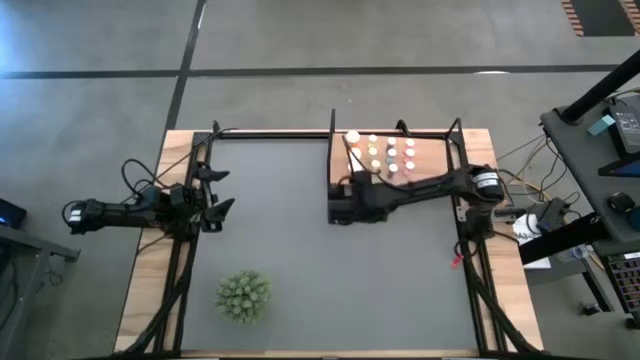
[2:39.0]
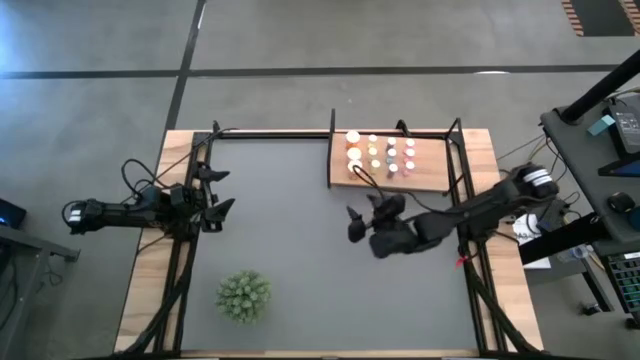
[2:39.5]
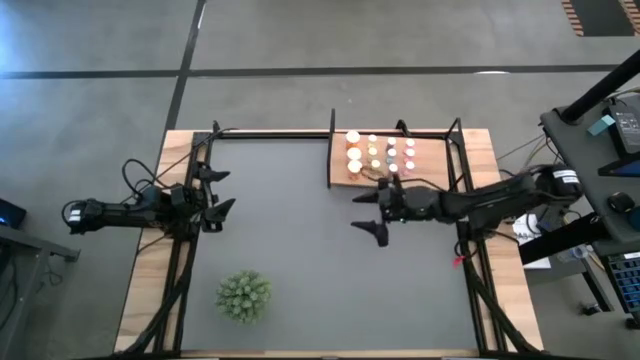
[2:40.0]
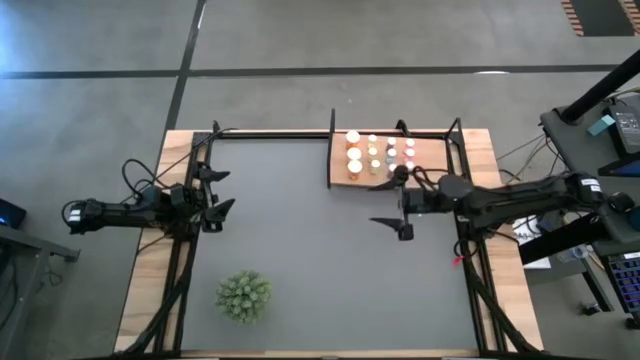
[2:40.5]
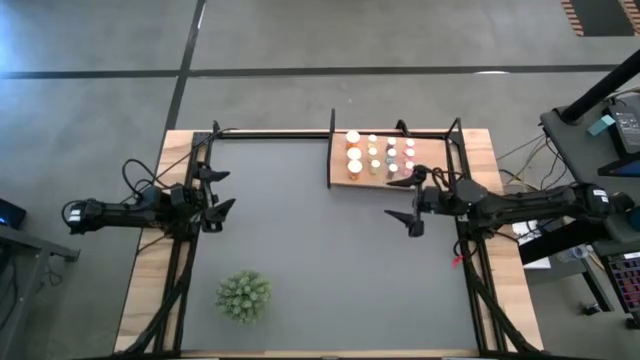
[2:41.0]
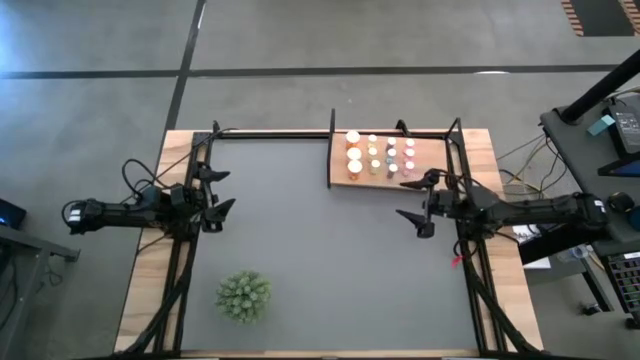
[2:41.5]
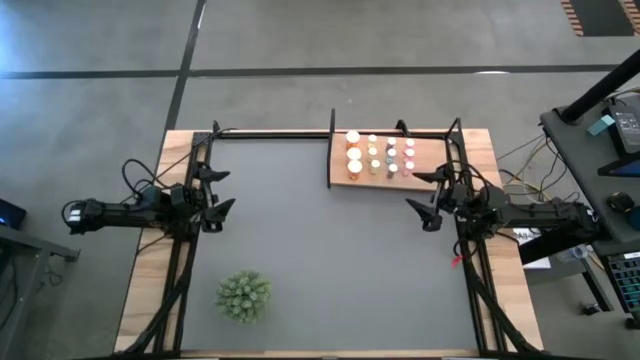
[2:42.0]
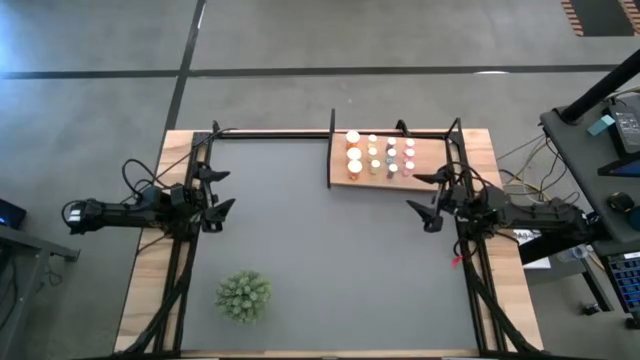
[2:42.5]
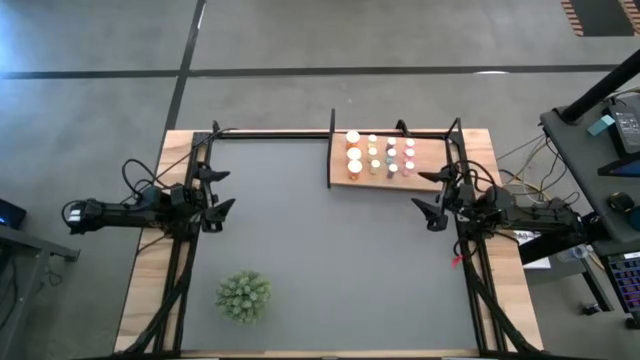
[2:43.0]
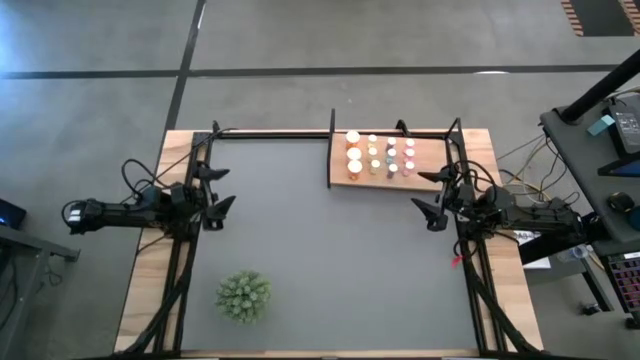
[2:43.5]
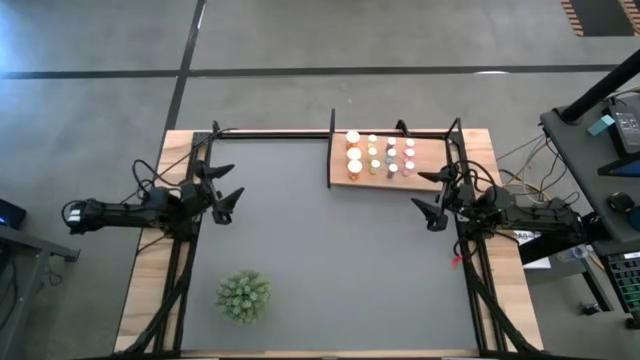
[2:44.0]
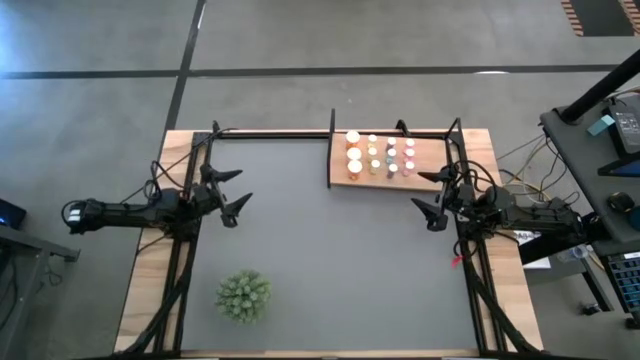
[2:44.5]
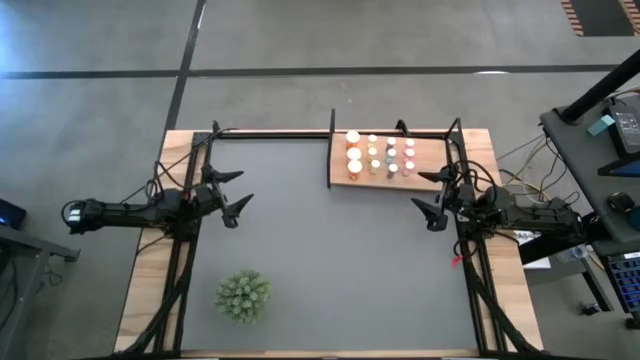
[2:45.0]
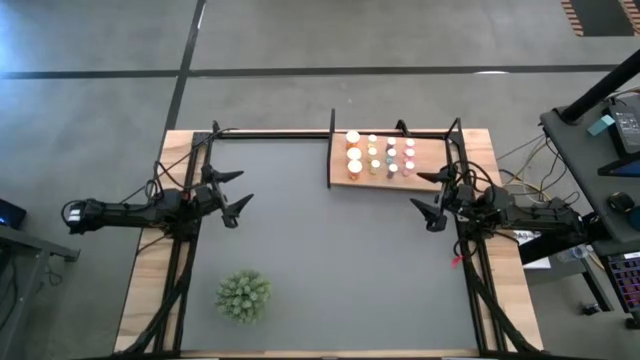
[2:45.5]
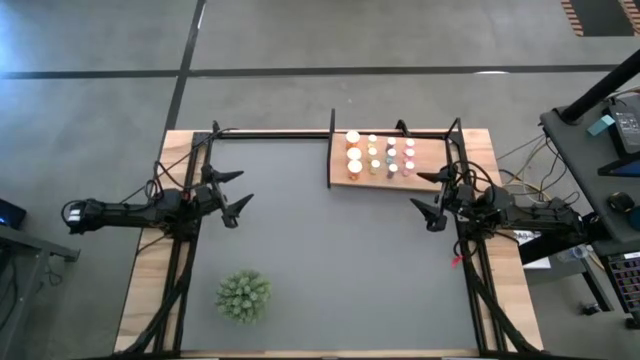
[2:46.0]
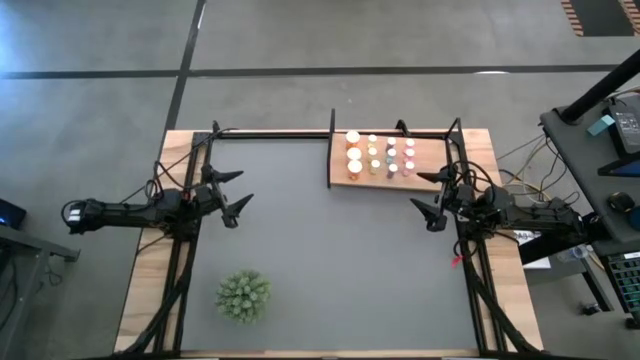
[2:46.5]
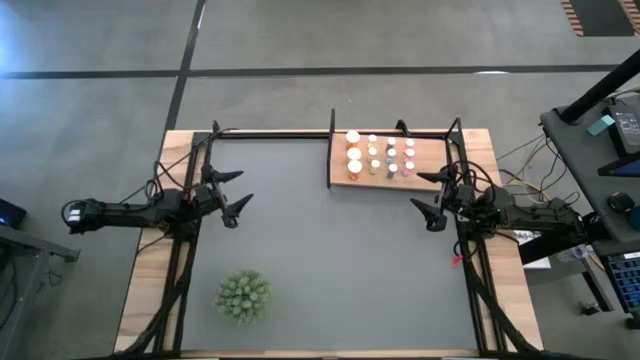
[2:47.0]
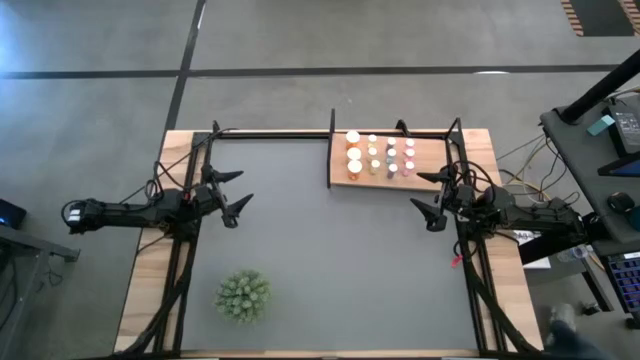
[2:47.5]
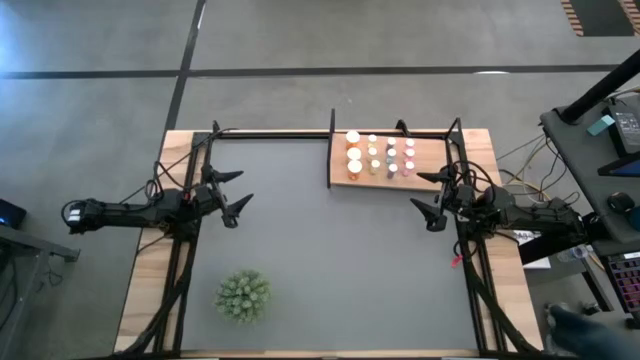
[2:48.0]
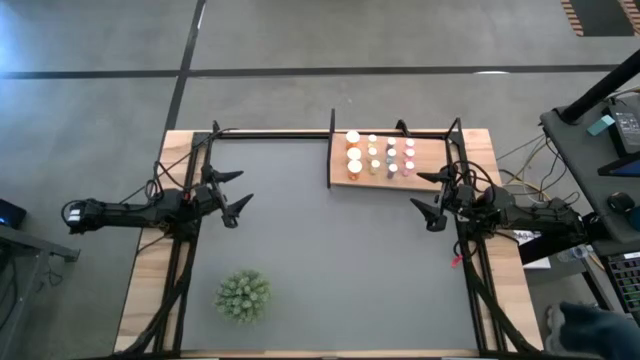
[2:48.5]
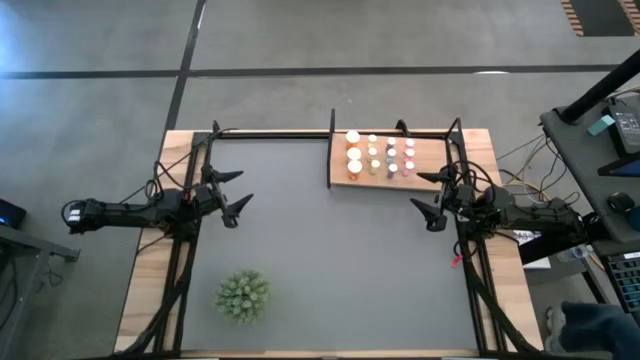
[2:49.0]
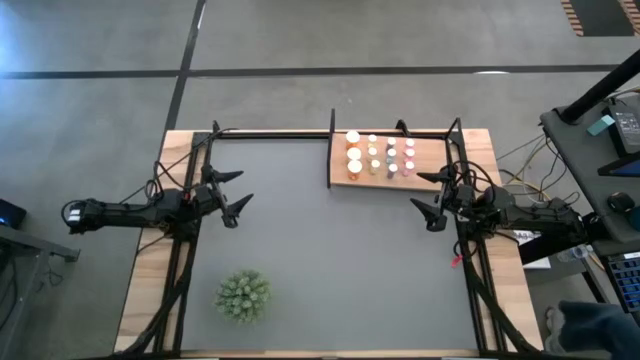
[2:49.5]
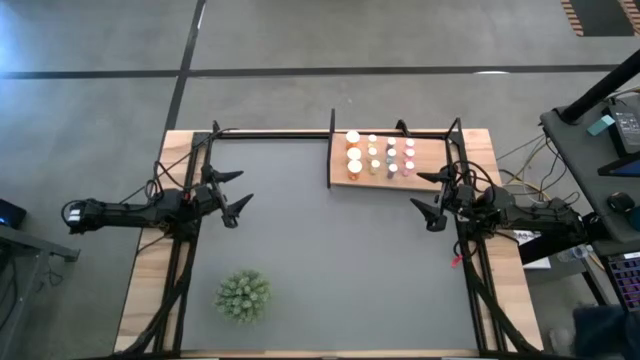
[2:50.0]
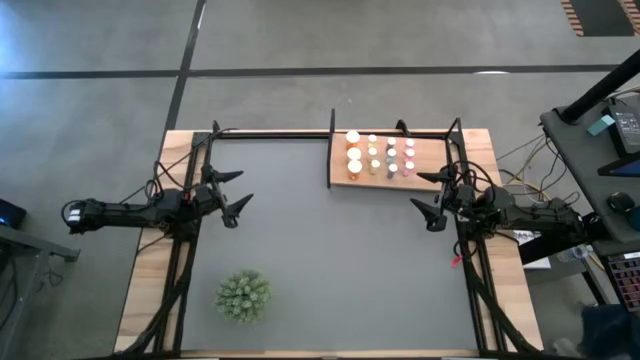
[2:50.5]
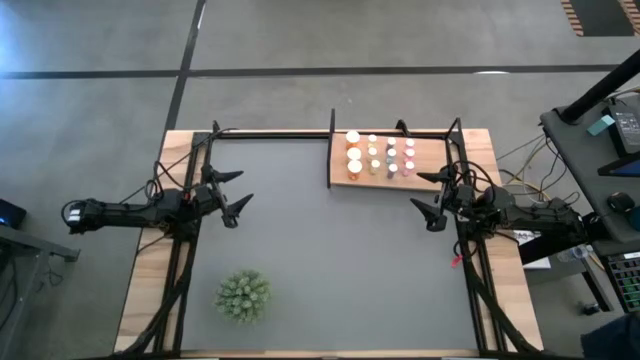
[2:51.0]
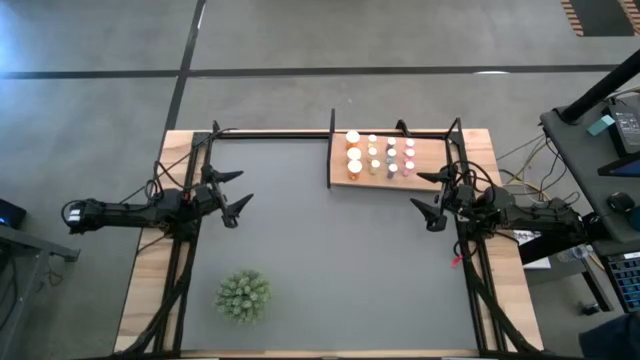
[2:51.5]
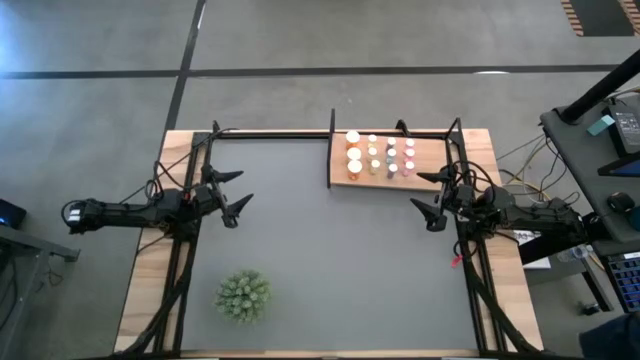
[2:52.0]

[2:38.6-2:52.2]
Task: Pick and place medicine bottles onto shelf by color
Return to Home Position

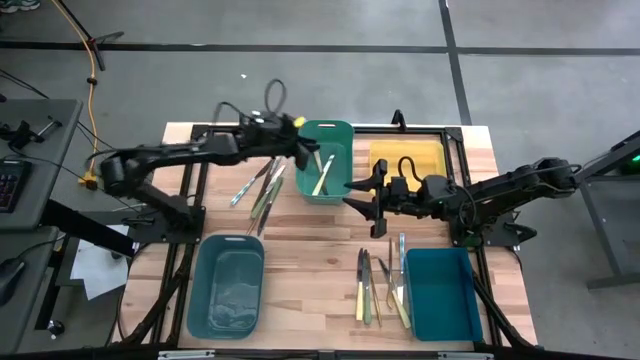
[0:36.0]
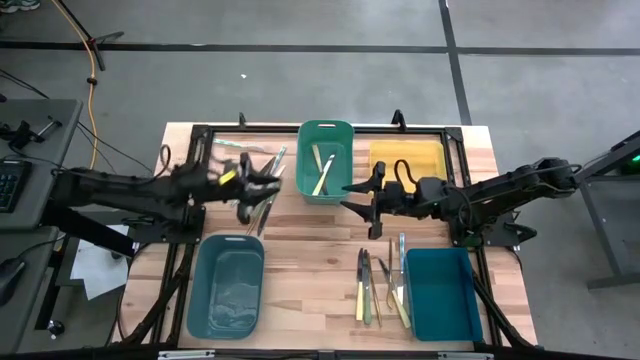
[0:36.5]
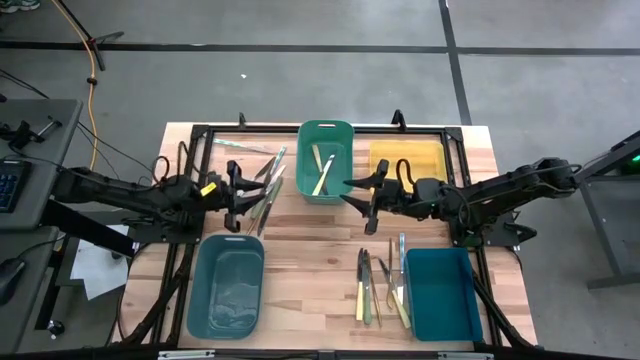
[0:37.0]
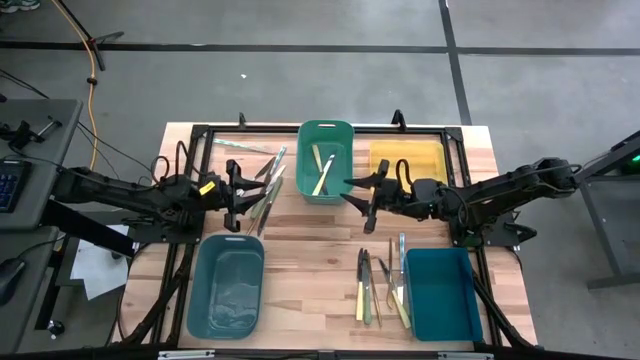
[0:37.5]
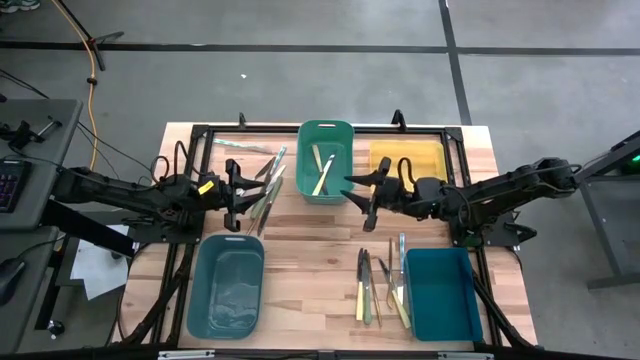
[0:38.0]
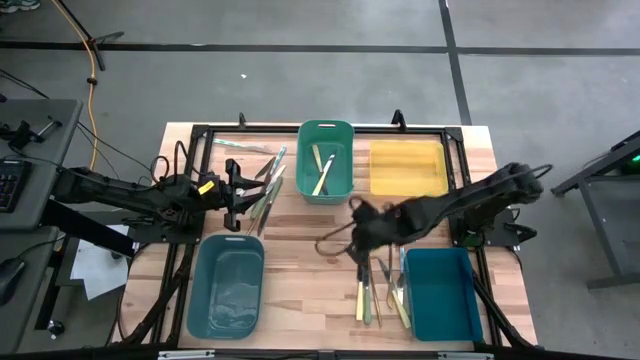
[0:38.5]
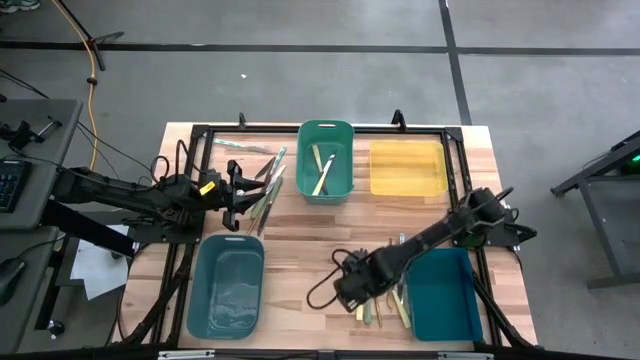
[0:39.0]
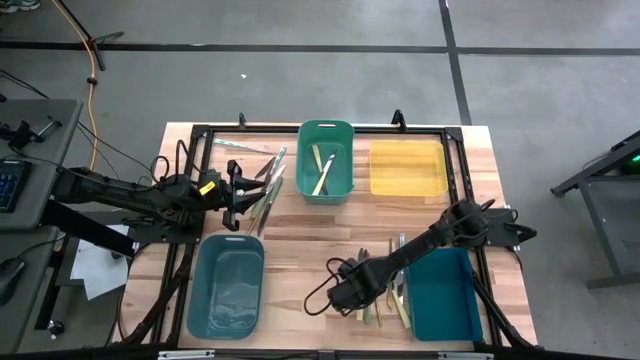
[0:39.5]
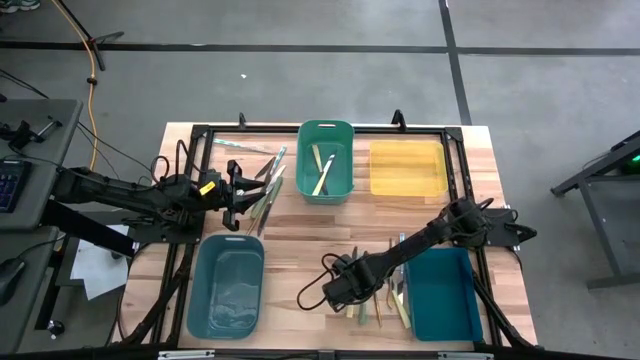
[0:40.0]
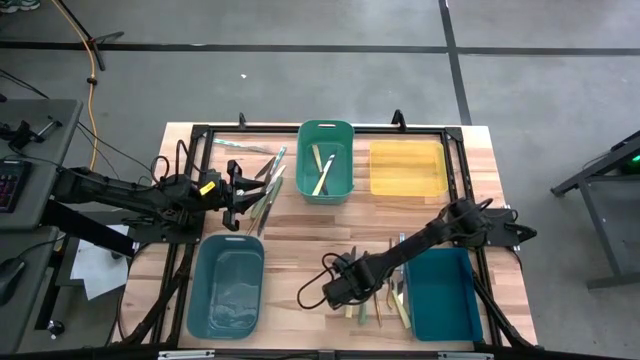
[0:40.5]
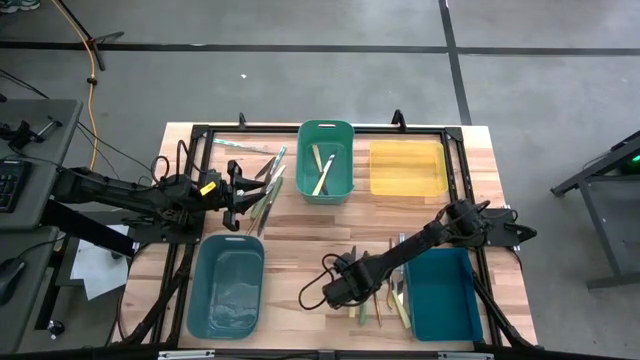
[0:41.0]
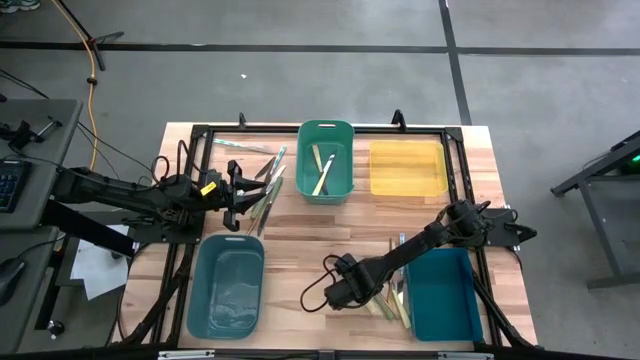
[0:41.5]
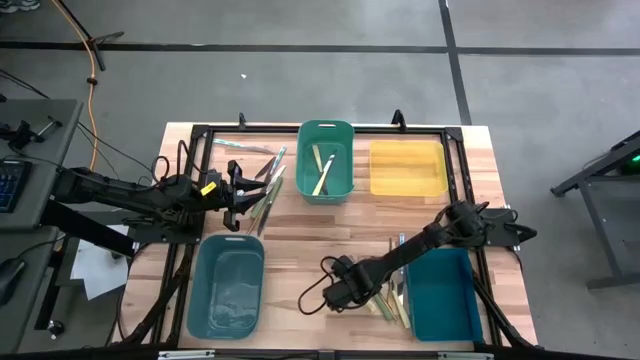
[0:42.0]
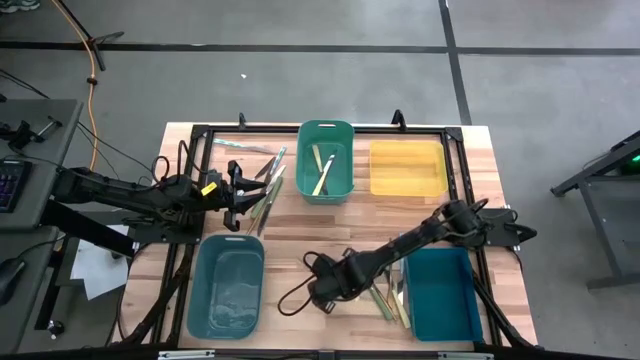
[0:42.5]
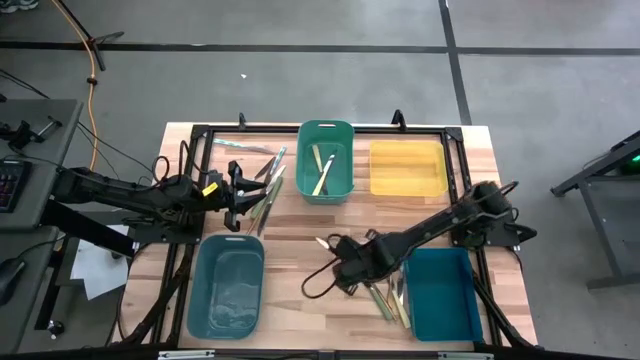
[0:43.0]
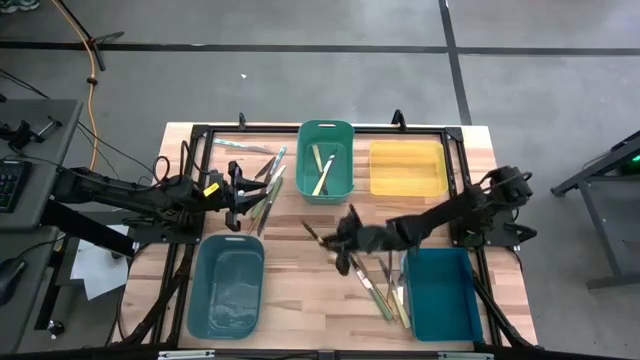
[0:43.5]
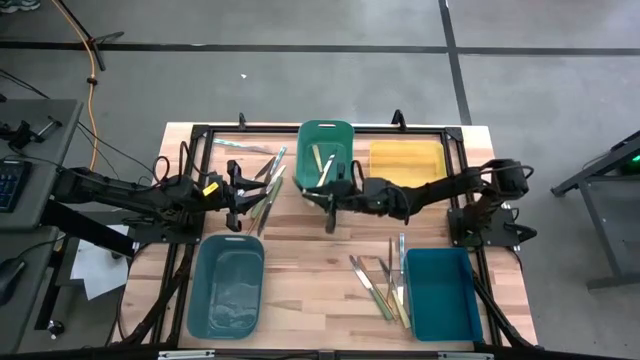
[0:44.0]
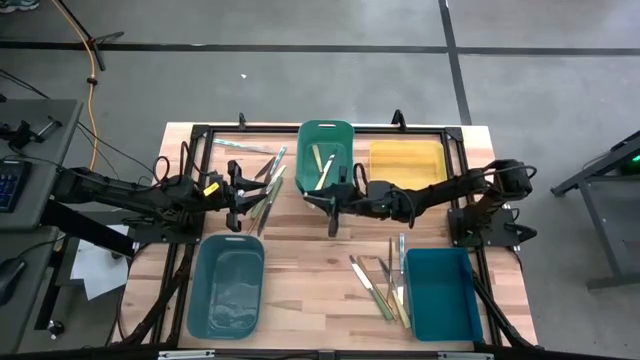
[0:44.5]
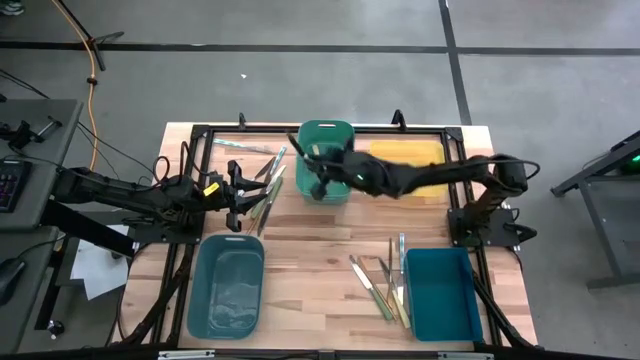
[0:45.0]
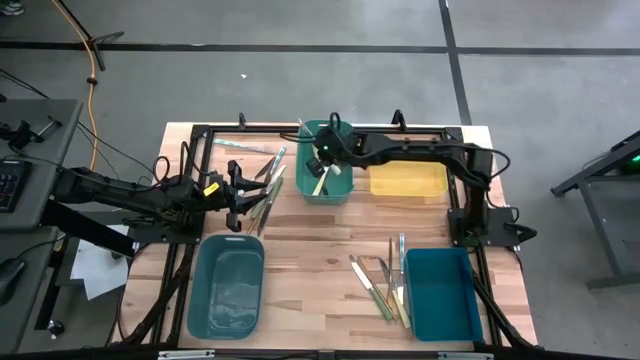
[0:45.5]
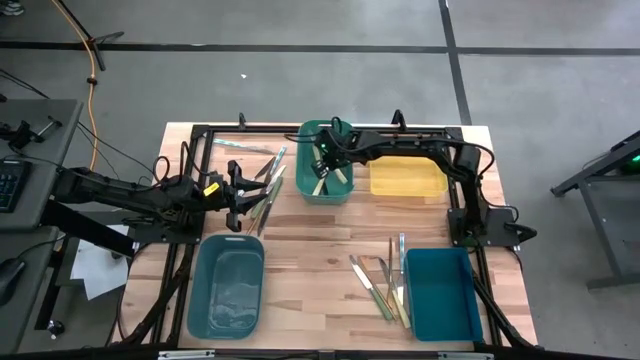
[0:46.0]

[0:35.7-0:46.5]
Task: Sort silverware by color (type)
Put the yellow knife into the green bin
